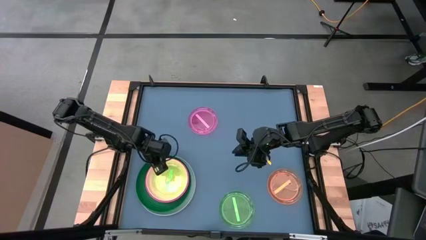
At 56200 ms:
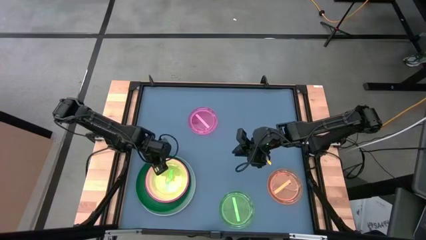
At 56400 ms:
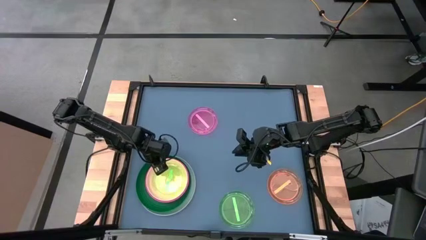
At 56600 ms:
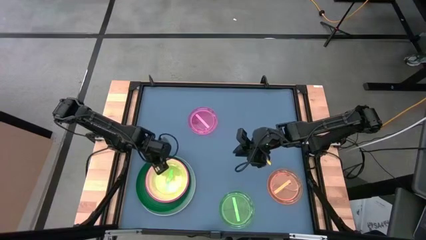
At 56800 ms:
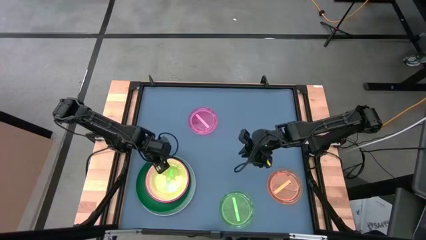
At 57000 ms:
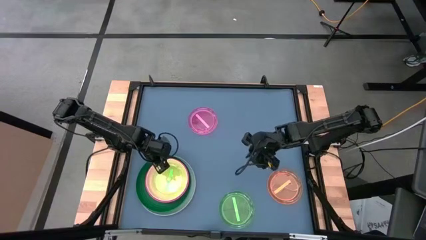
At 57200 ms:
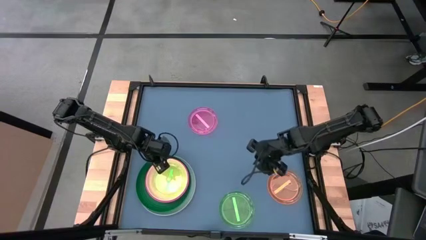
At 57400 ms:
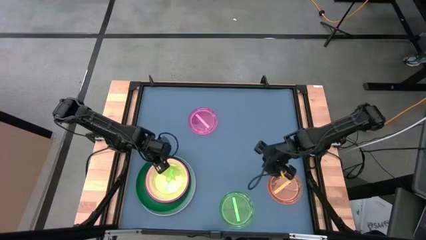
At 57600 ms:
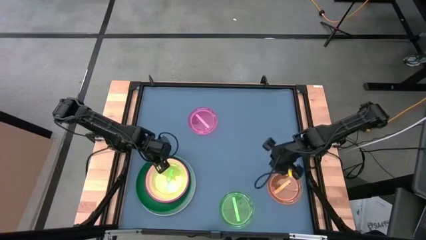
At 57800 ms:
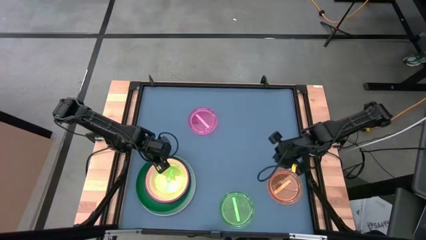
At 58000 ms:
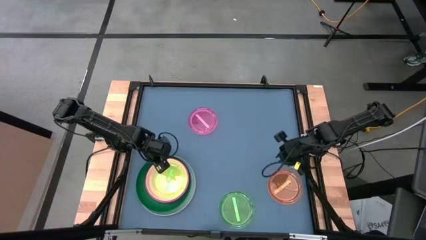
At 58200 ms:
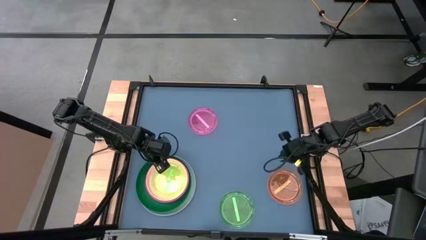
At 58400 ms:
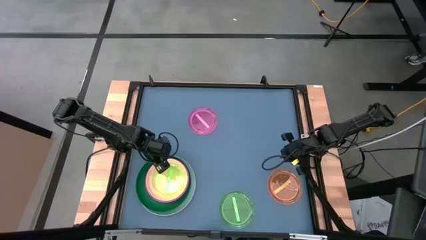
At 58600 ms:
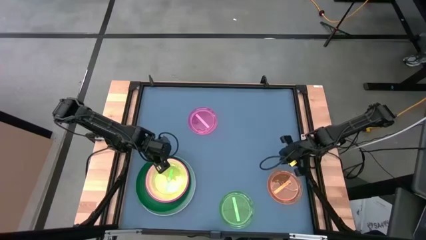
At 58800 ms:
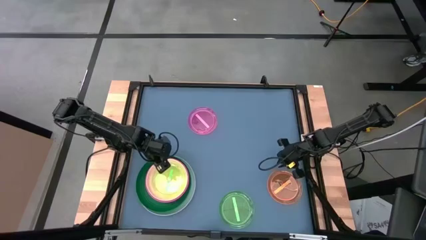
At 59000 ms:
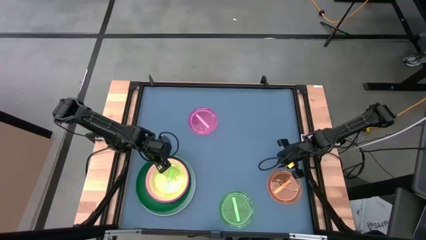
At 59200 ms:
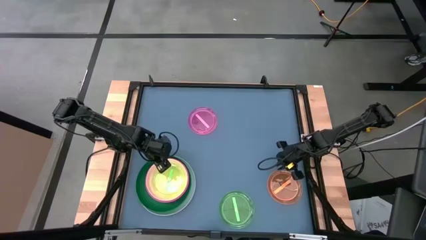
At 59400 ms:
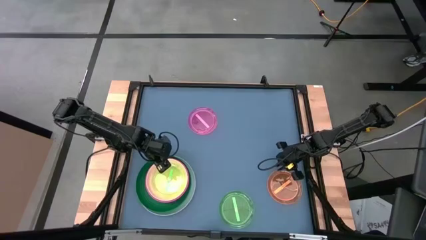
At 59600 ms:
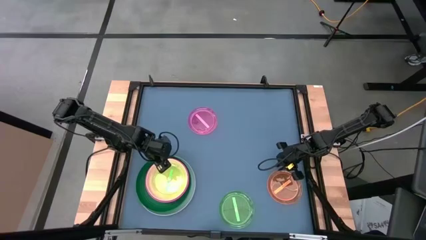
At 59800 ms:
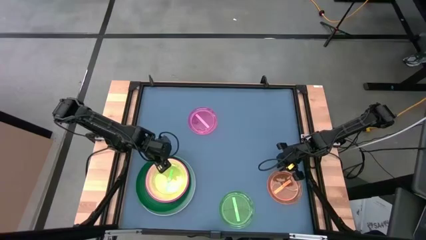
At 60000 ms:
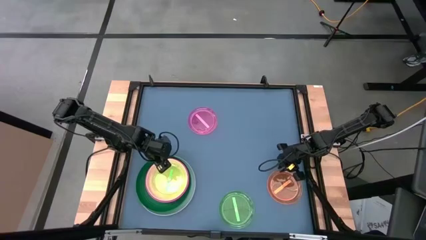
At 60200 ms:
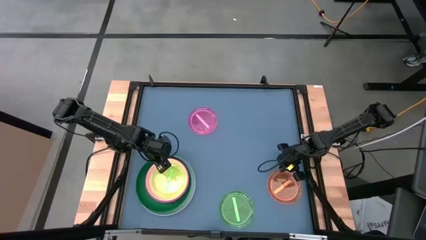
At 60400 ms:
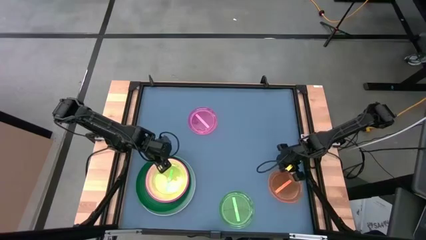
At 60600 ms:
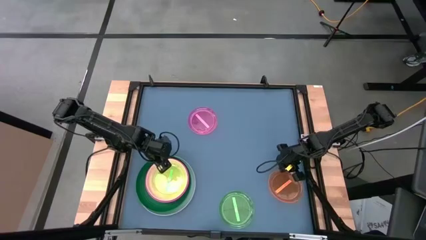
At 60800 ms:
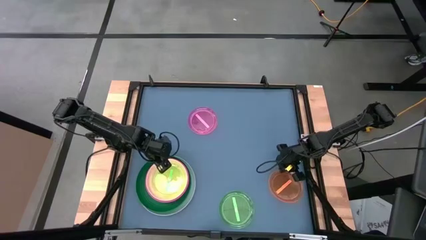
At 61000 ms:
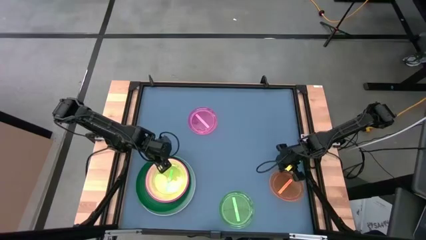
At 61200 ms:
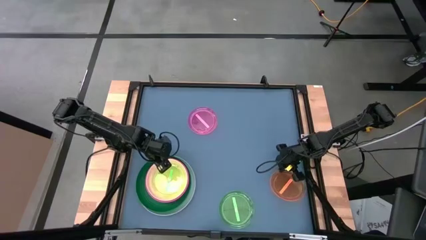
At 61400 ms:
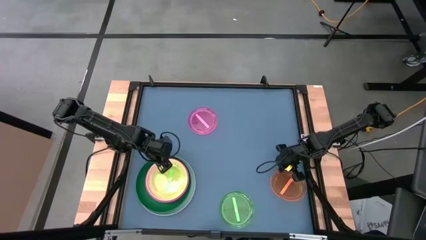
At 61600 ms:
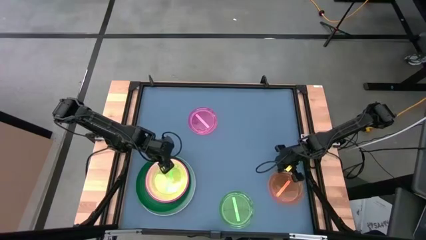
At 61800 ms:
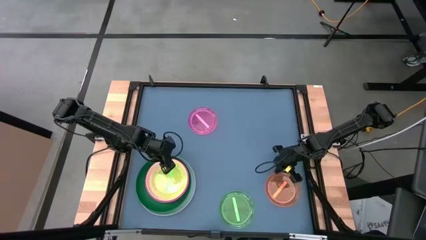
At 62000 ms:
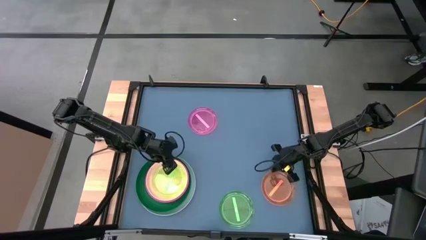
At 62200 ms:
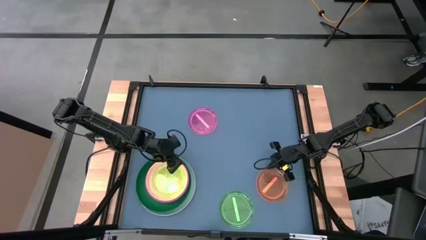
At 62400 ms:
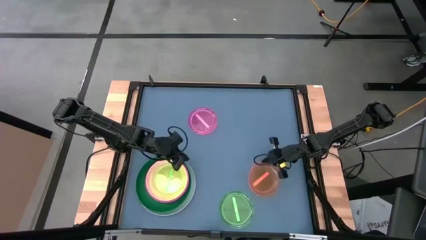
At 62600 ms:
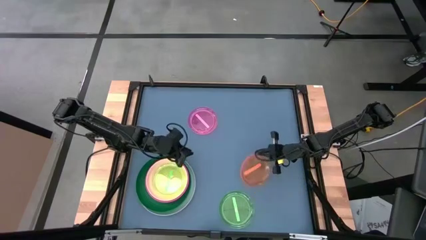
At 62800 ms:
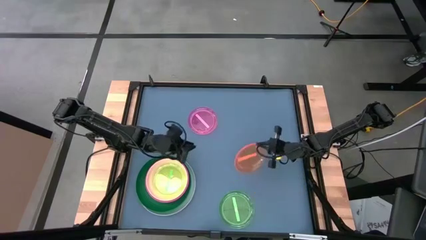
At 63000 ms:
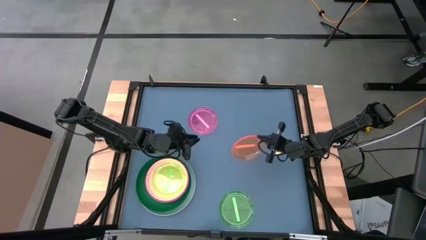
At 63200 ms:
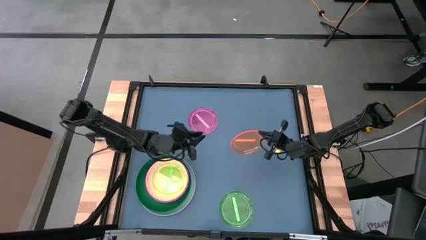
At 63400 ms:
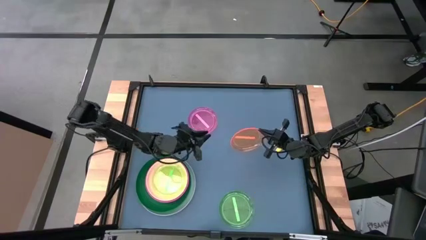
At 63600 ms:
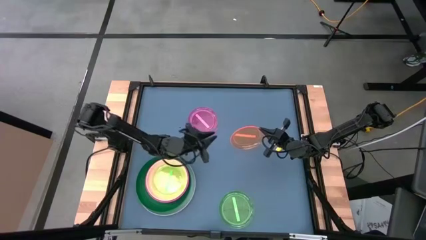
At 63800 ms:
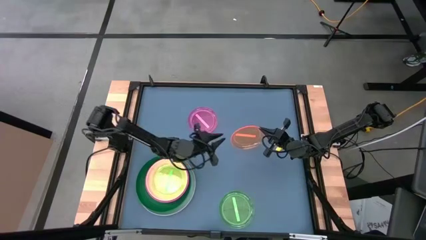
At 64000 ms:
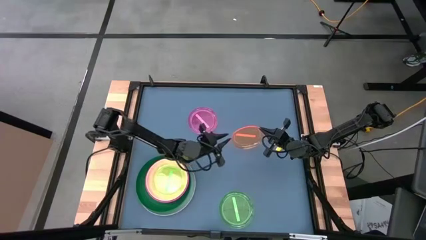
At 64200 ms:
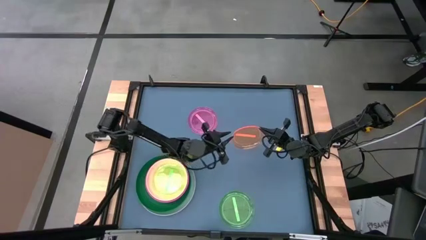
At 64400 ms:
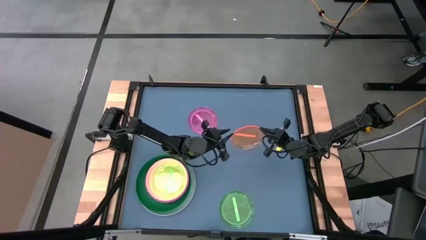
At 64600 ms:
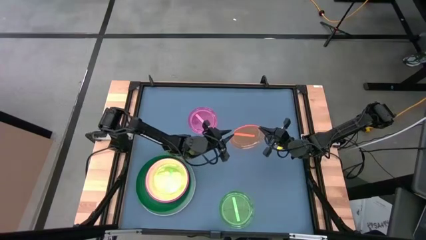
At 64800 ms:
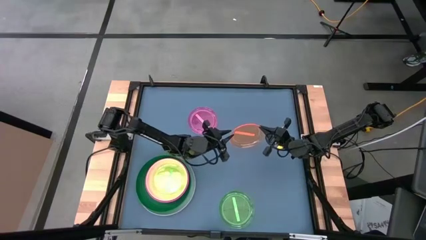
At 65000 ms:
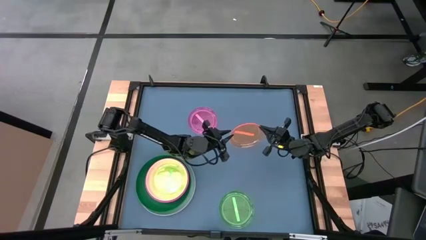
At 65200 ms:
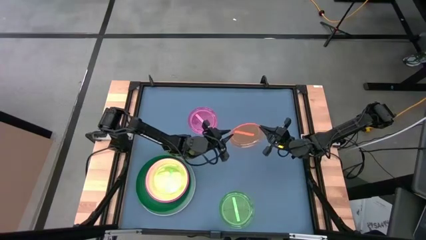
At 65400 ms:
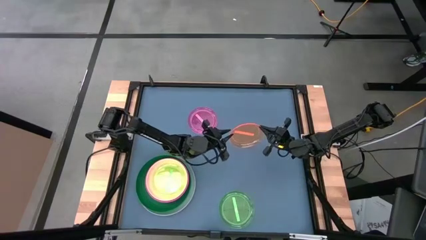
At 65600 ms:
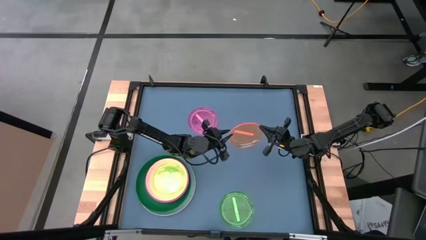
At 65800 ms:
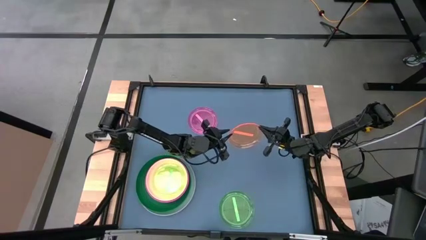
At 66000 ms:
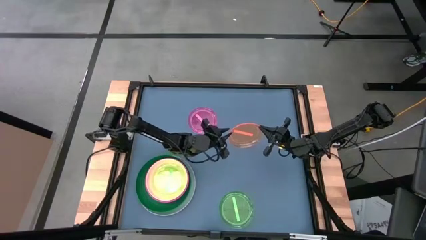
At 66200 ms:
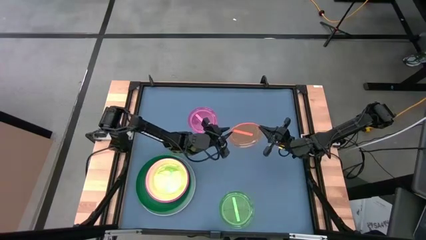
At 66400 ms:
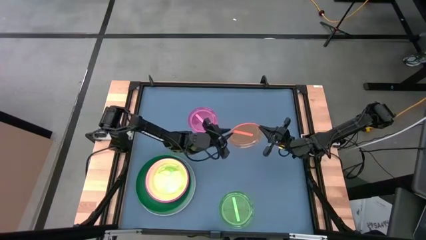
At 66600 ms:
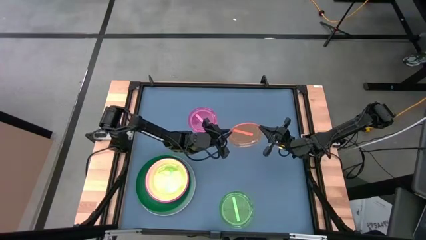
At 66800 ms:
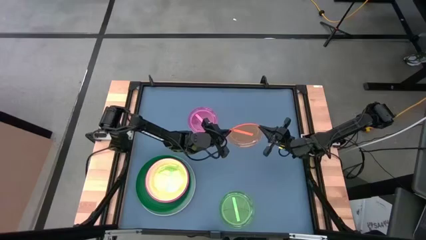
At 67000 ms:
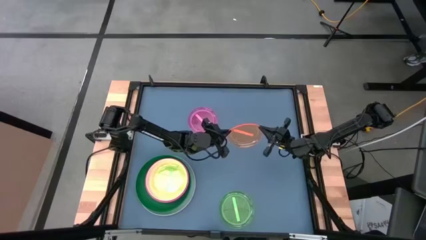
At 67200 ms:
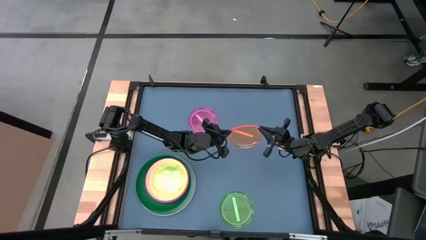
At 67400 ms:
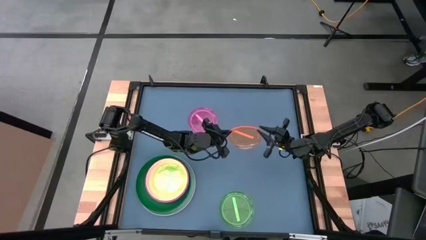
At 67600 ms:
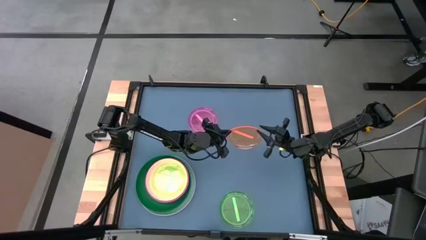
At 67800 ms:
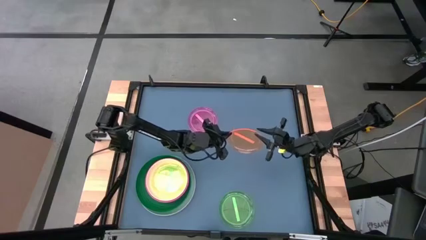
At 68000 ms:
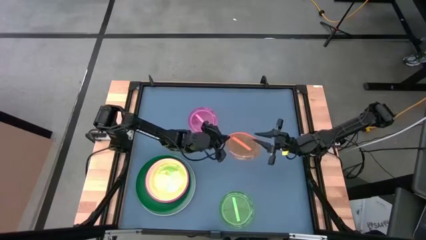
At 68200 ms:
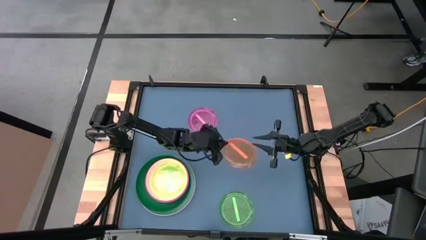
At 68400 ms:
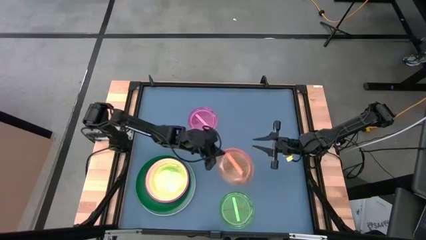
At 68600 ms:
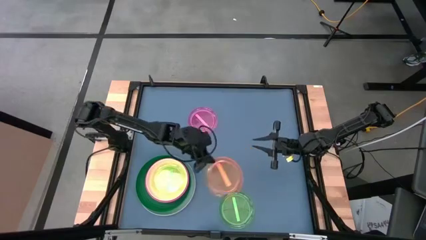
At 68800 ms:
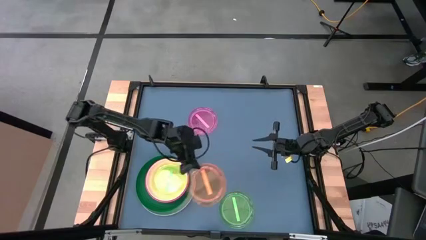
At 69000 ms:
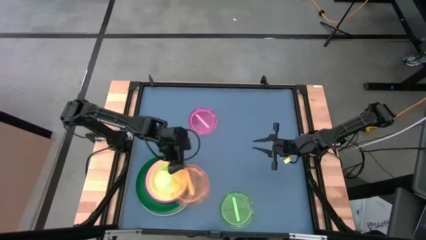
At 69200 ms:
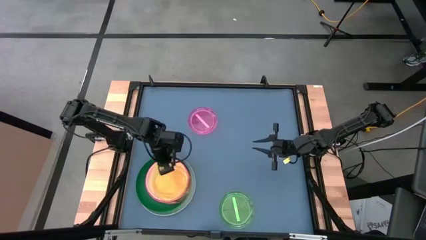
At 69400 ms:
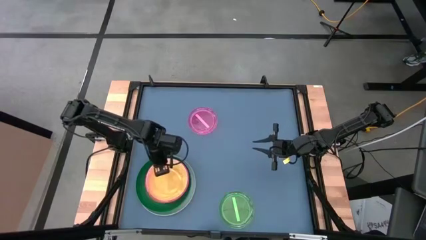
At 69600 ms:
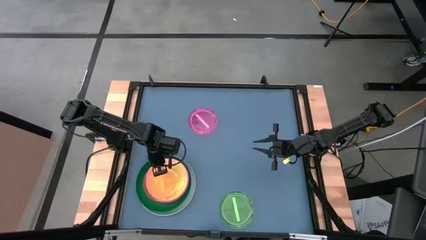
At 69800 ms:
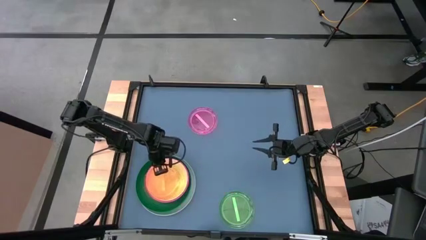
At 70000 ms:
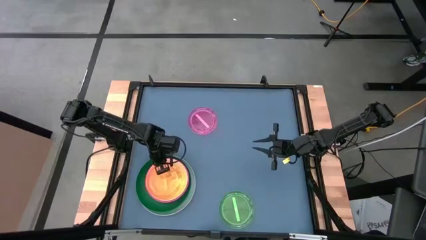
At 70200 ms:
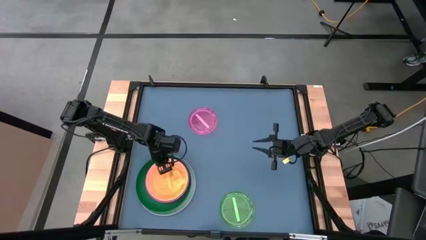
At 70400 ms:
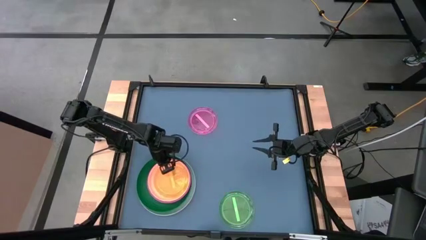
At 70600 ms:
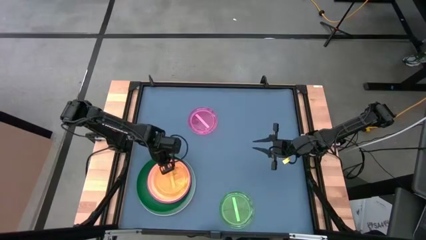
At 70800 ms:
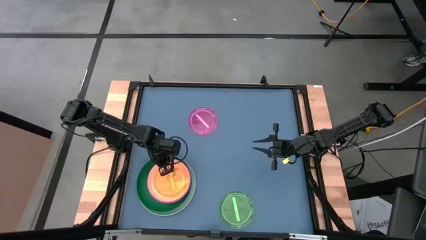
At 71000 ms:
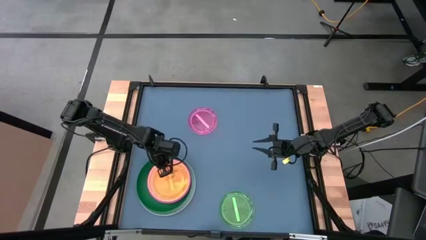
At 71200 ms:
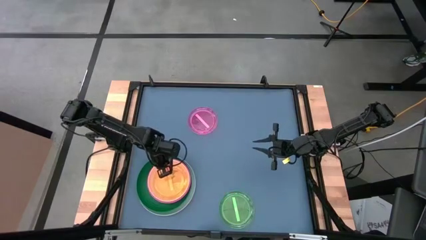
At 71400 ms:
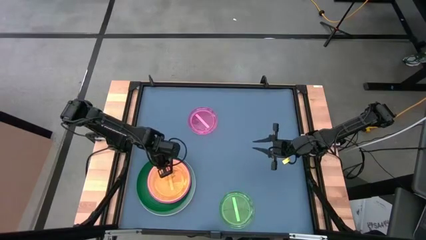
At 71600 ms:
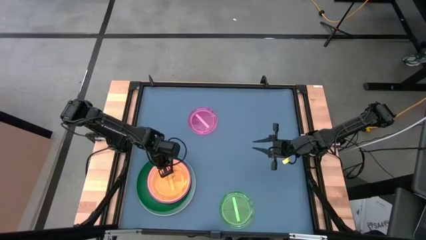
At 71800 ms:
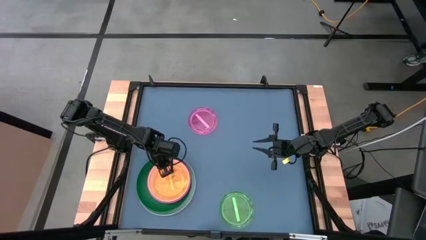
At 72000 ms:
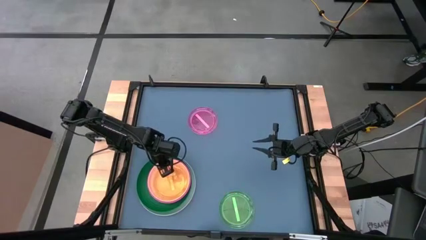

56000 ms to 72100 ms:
Task: Stack plastic plates
Stack the orange plate on top of the green plate
